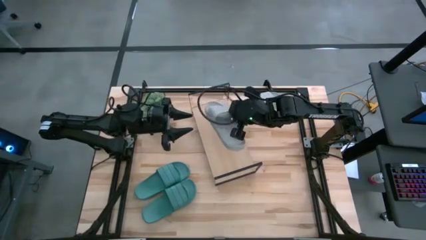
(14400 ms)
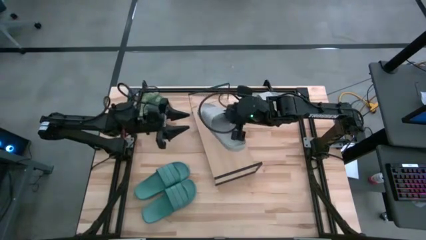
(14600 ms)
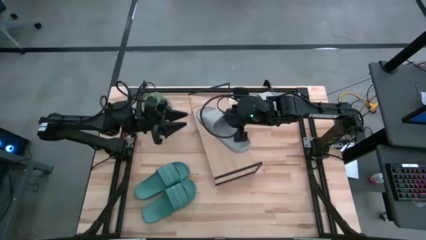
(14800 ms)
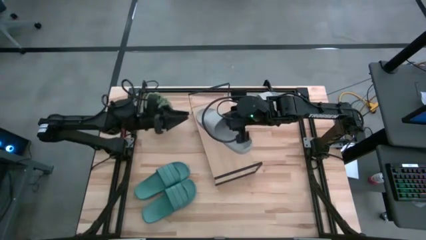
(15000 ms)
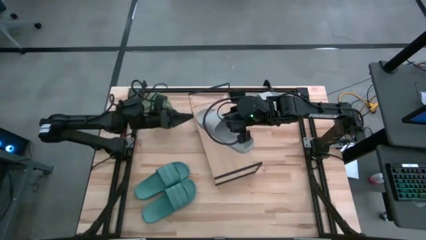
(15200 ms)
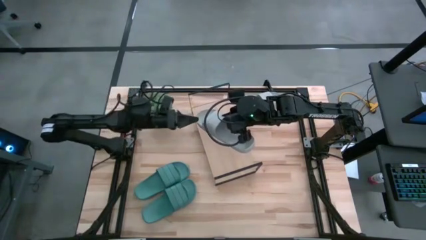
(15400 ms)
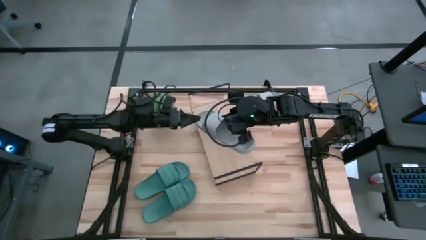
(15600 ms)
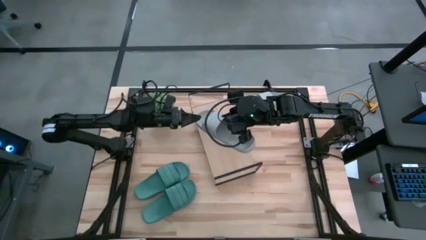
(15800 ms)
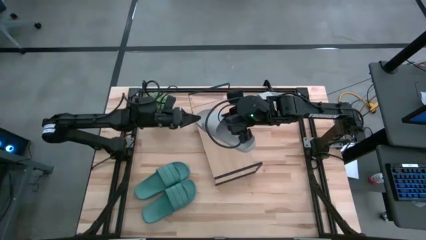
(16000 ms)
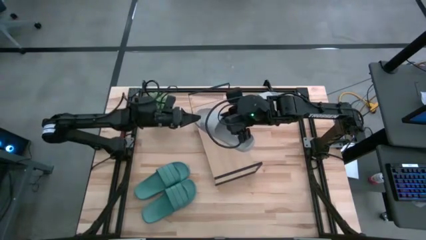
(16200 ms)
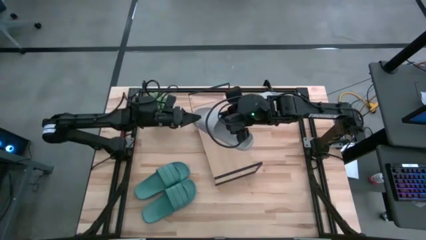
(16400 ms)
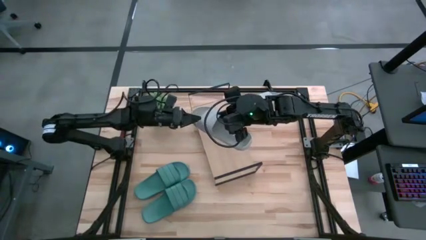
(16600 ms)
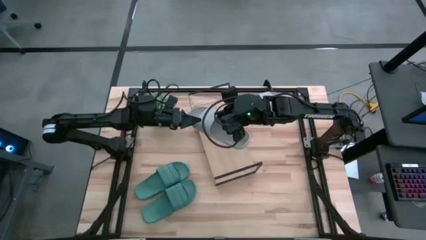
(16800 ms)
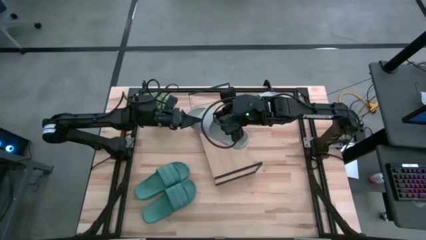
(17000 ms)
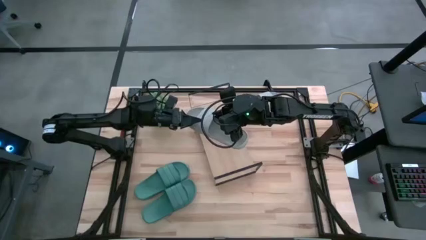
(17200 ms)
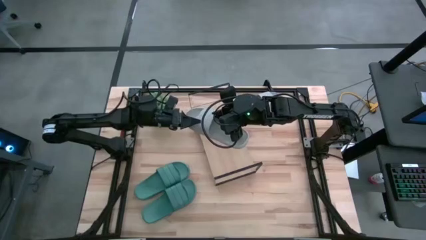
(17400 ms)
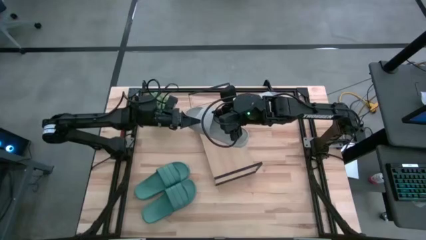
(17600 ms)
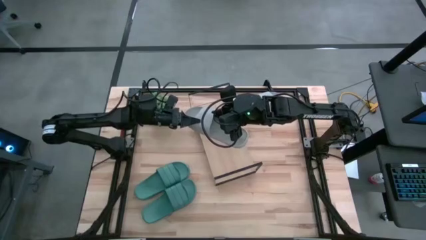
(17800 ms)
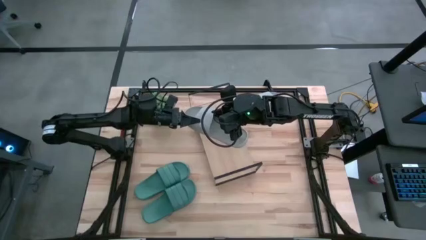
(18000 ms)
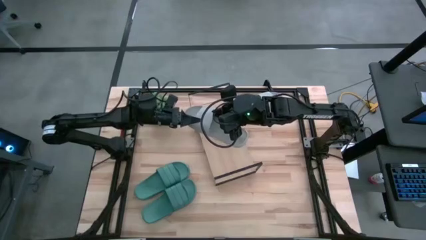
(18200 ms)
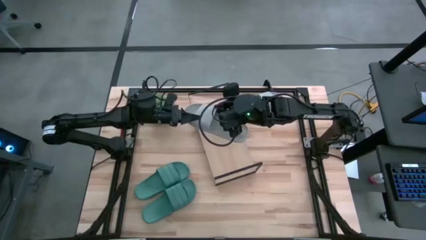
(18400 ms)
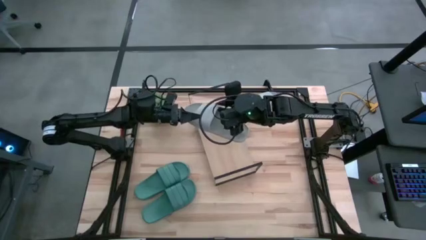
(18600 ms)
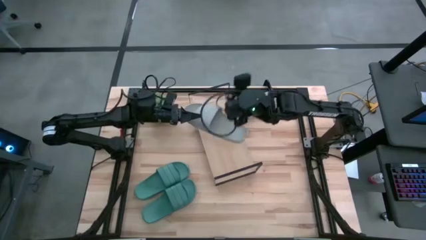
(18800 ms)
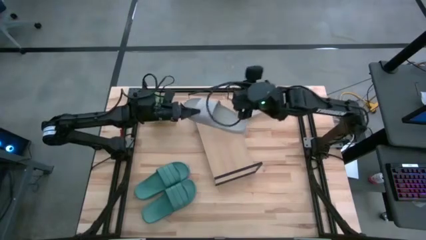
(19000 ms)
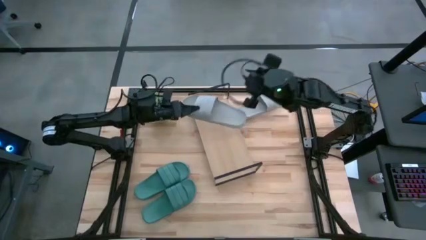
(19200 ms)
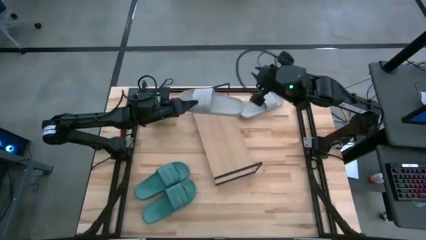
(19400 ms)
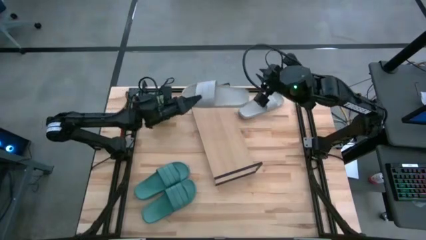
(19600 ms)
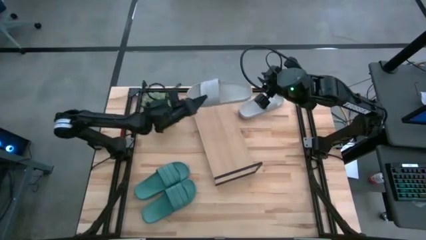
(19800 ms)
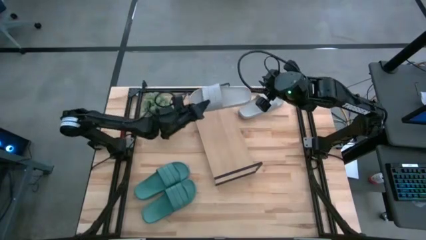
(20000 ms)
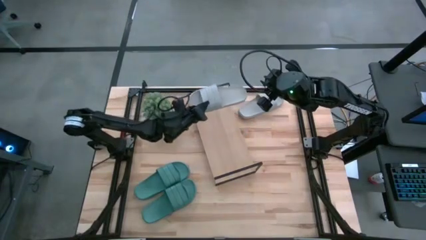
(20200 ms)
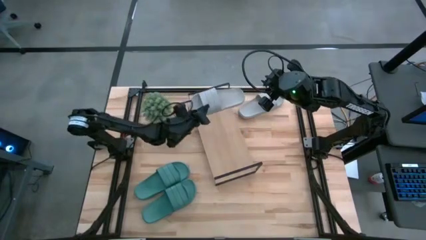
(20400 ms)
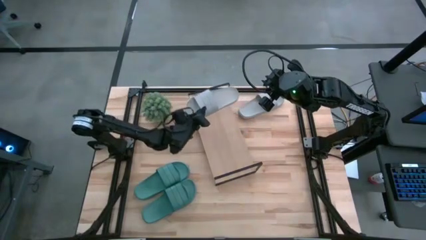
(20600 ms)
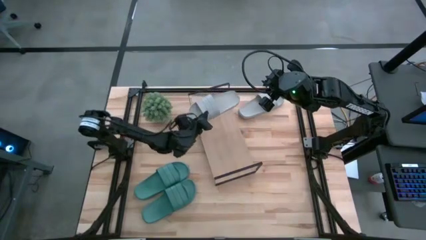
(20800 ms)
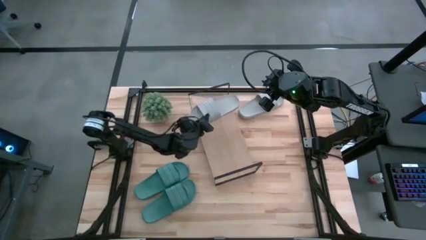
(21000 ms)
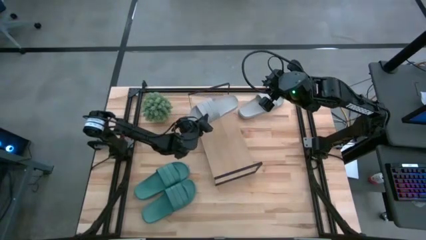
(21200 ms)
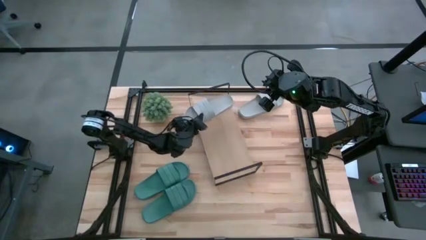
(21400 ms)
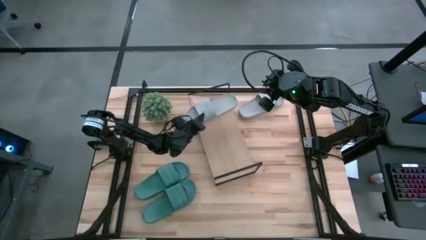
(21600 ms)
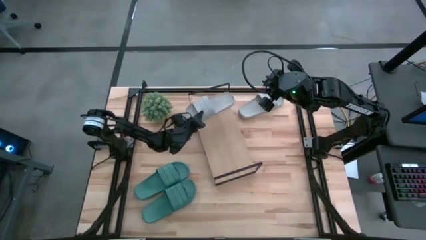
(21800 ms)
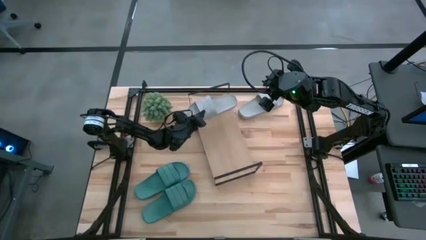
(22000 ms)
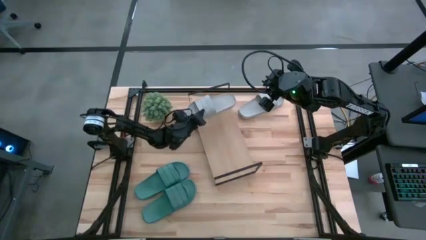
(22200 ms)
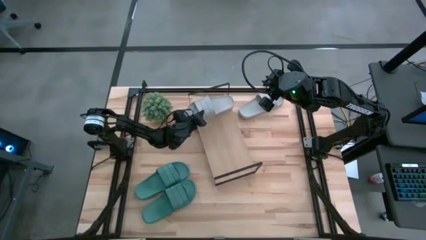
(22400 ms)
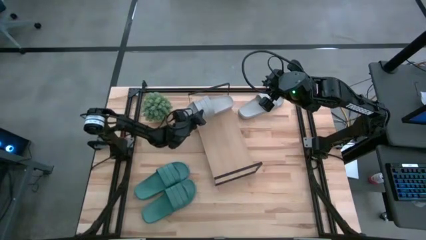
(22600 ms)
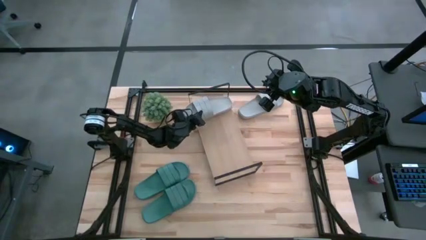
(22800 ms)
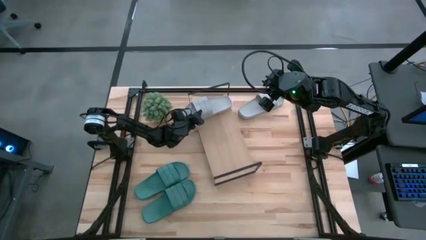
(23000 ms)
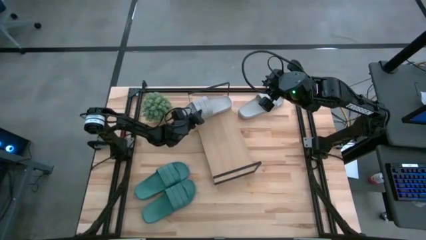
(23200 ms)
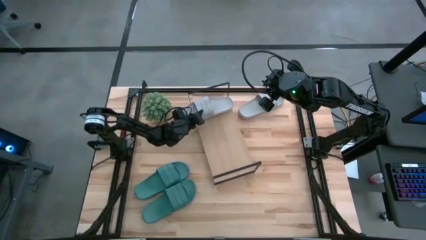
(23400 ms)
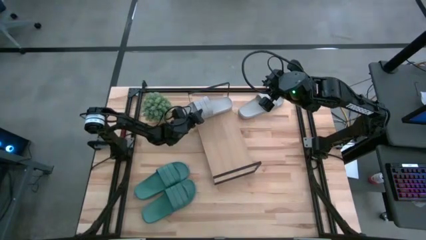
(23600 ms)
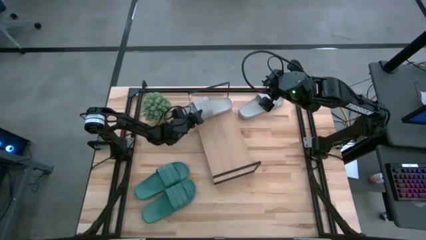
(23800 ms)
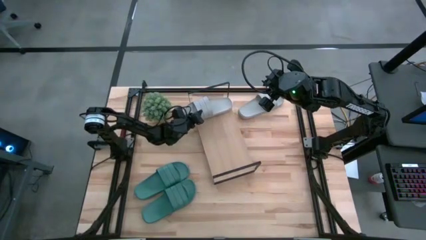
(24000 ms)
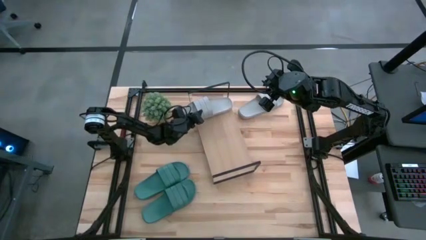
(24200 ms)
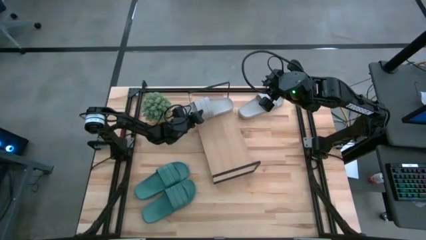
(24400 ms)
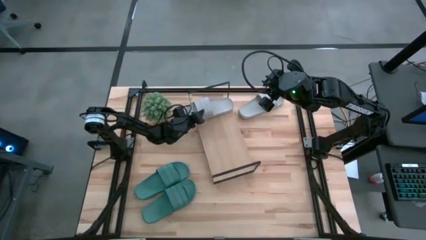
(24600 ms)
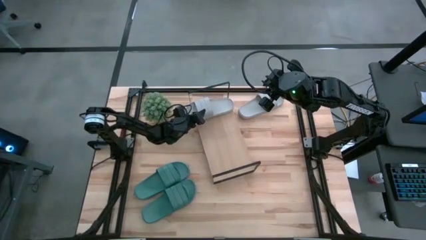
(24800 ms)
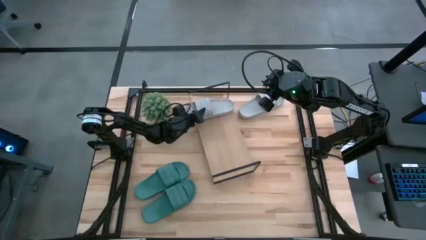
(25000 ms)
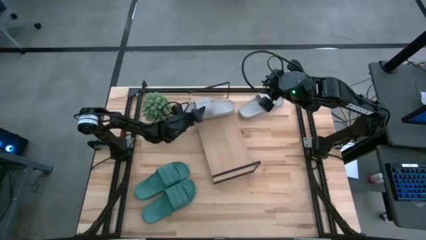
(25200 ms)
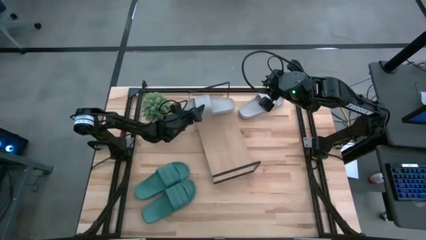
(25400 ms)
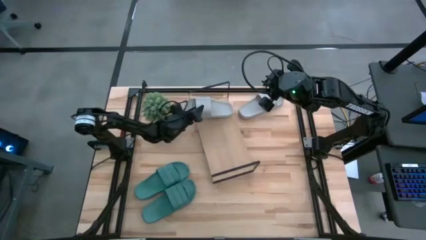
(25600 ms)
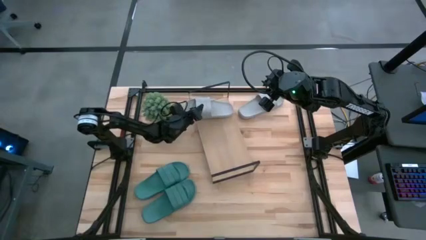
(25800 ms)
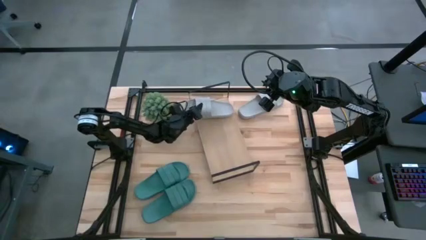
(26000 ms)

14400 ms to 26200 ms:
Task: Pick and place slides into the shelf
Put the gray slipper on the shelf
